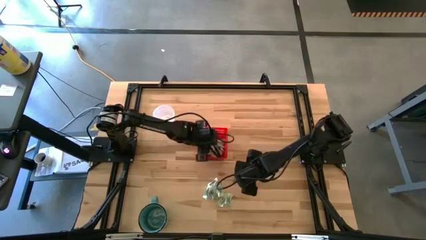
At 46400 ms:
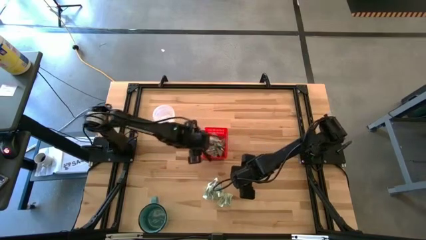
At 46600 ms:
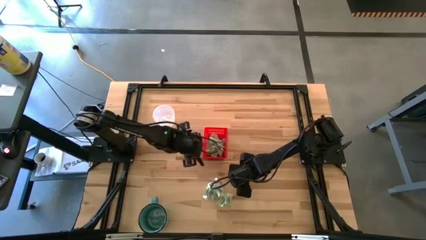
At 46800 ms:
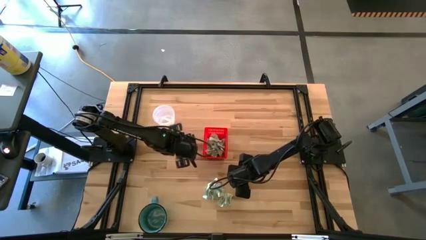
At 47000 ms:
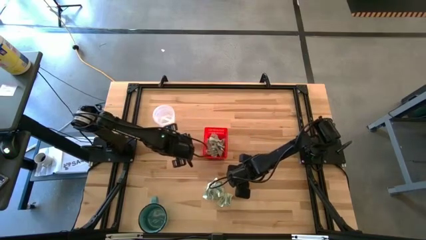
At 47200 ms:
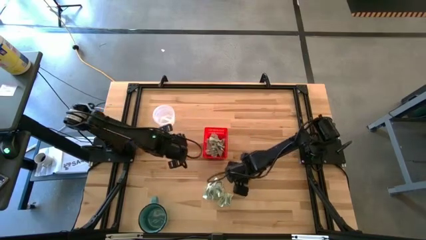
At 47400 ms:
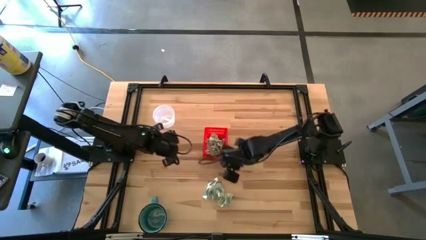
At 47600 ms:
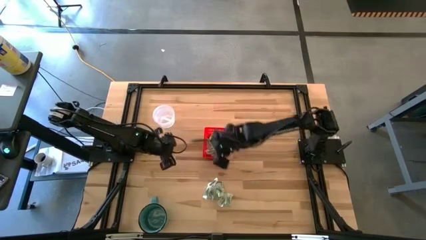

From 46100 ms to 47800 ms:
Task: Pick and place Stevia / Truvia into bins
Put the truvia packet into the red basket

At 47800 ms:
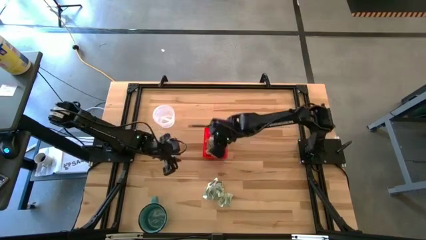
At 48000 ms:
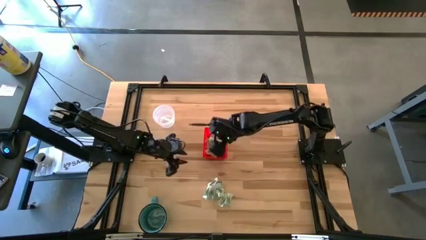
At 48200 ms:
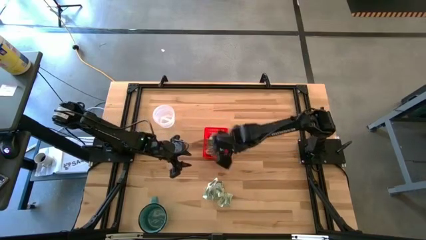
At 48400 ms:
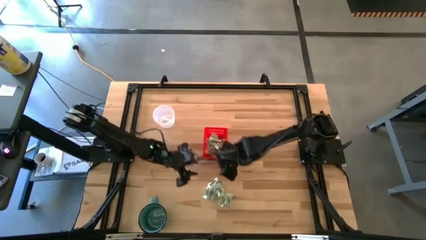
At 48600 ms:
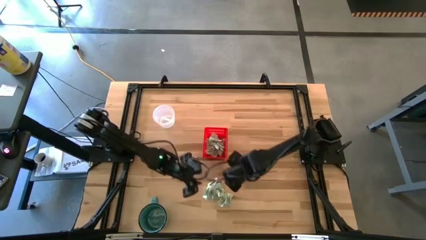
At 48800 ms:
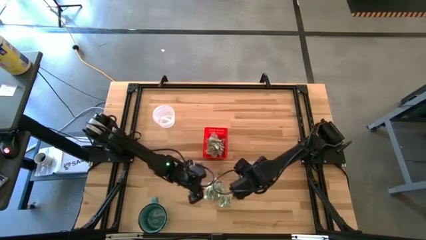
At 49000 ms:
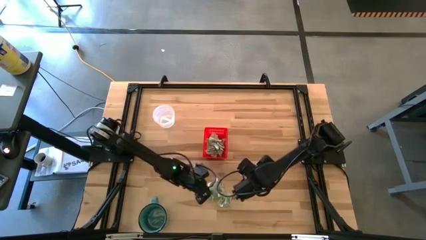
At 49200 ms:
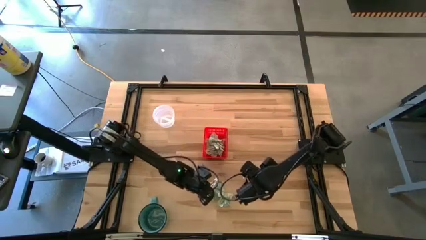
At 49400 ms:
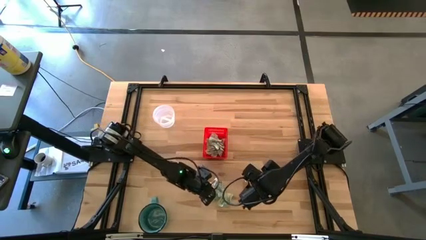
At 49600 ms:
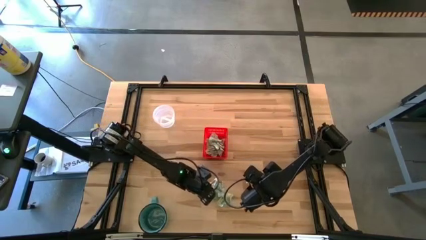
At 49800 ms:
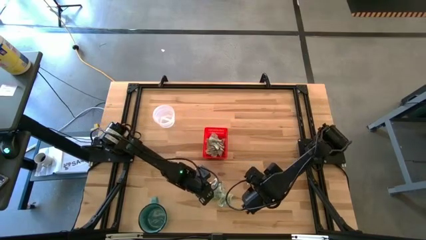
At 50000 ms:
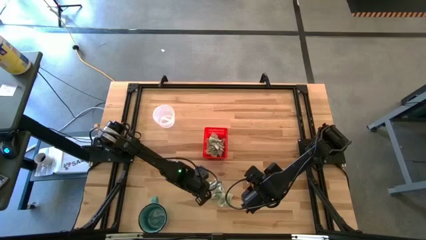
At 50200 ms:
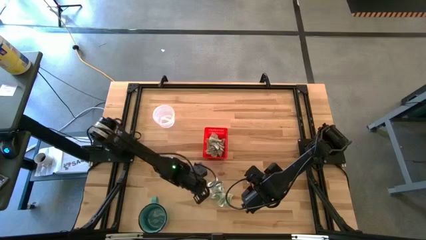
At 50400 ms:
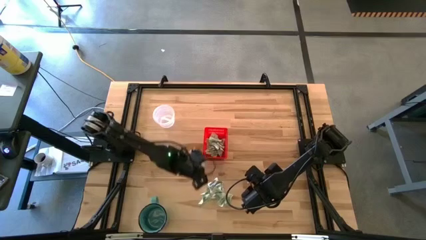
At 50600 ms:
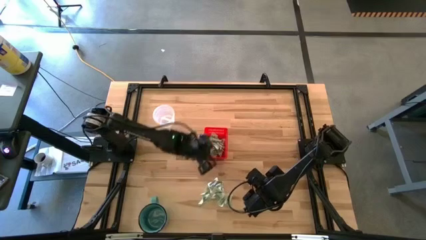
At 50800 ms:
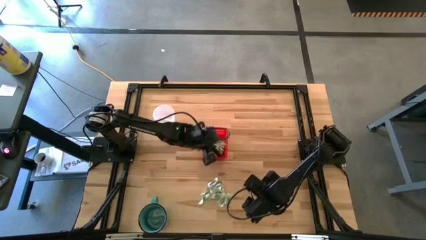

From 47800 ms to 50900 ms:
Put the stevia packet into the red basket

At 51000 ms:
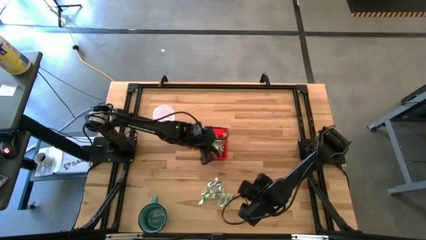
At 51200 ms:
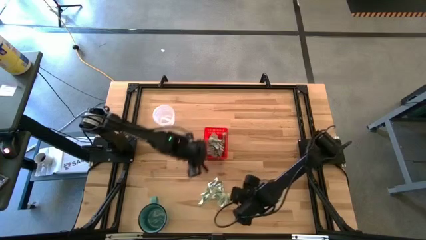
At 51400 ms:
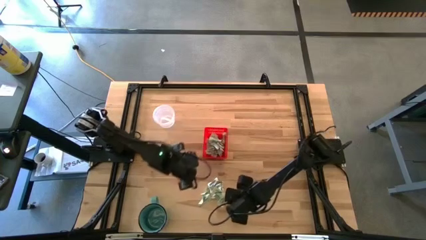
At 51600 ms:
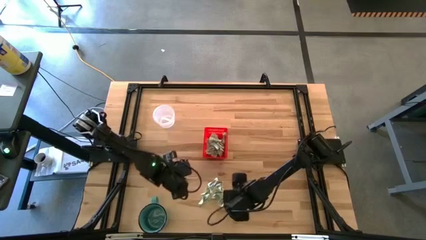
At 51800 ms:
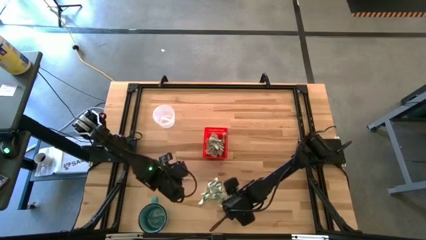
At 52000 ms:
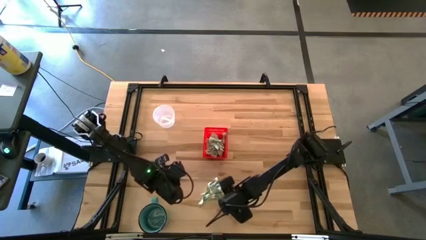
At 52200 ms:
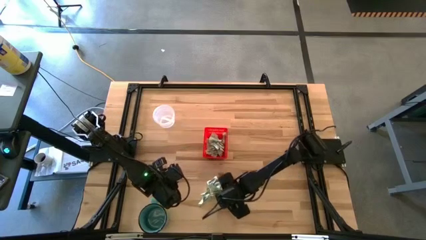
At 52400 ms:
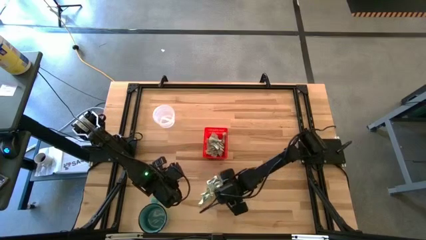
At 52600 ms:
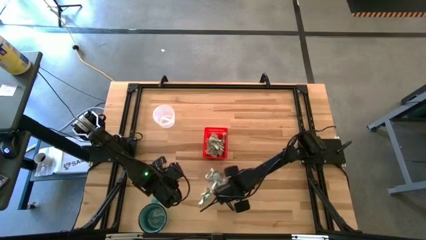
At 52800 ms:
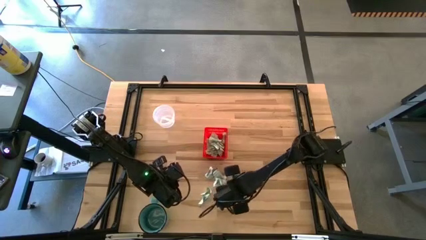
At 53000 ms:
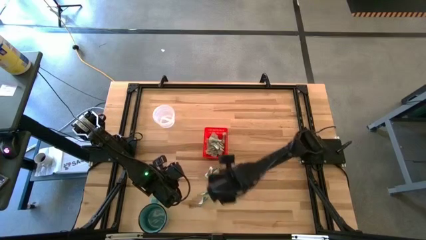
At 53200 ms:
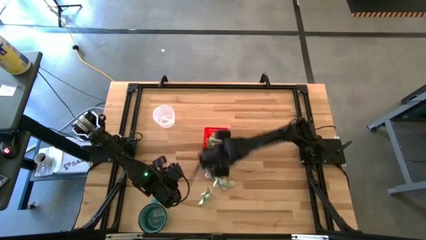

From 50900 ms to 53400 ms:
Put the stevia packet into the red basket

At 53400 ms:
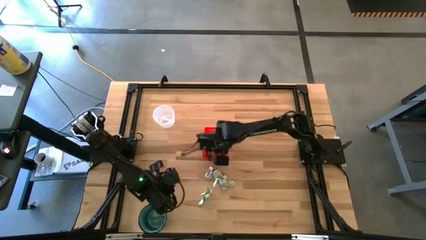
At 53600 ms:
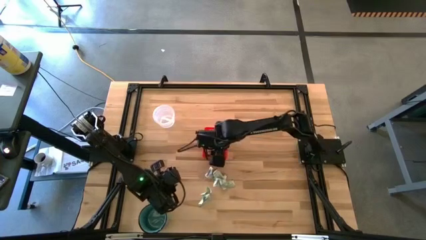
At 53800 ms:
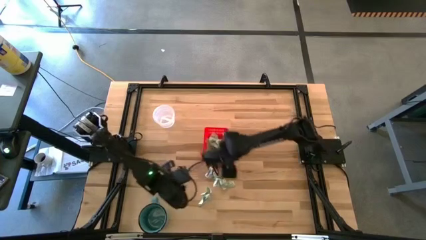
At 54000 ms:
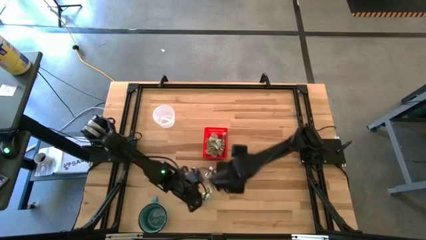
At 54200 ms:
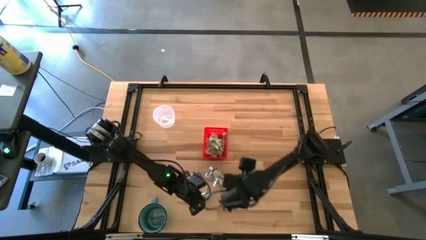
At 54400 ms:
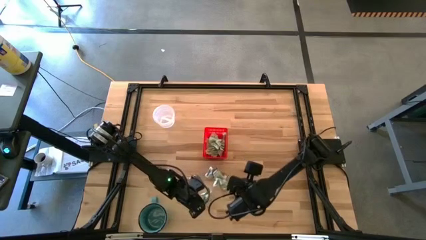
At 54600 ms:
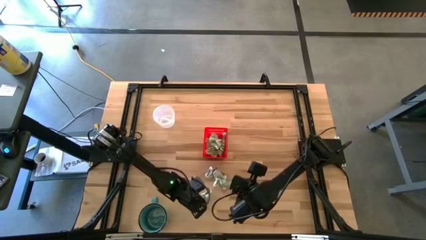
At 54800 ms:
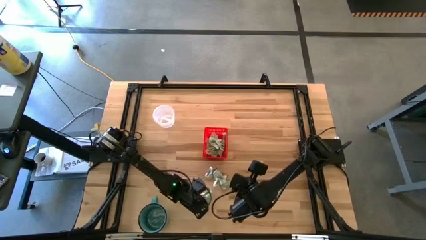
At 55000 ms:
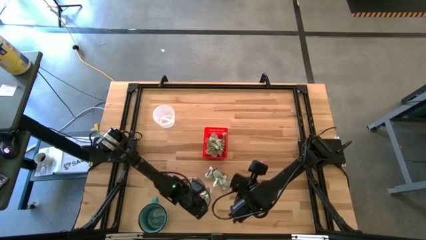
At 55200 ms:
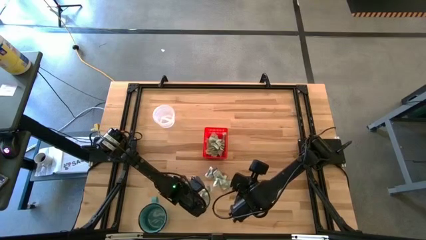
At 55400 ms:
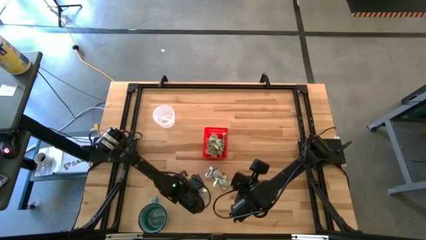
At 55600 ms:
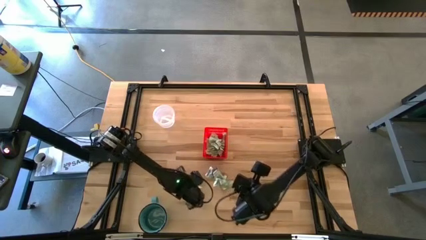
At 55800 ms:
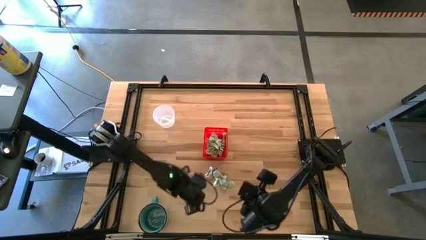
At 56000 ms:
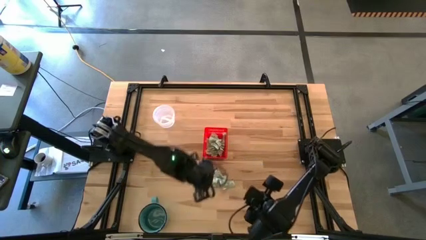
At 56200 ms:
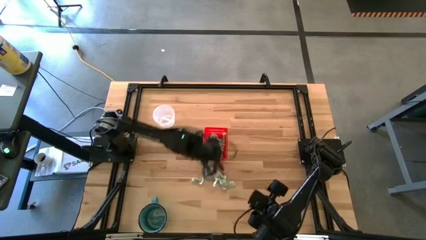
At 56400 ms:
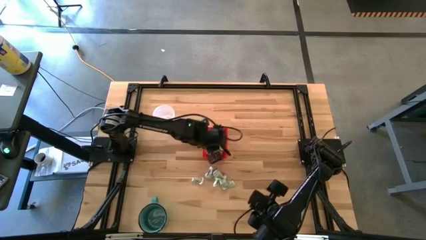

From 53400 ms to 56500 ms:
Put the stevia packet into the red basket

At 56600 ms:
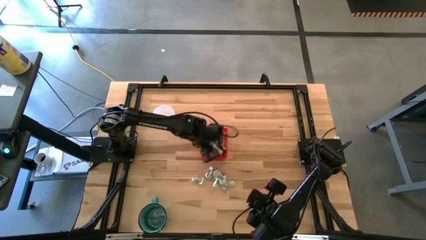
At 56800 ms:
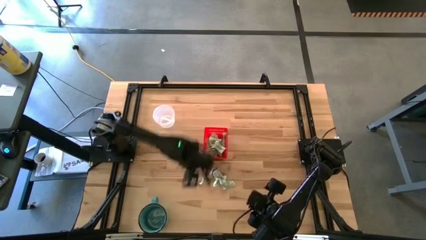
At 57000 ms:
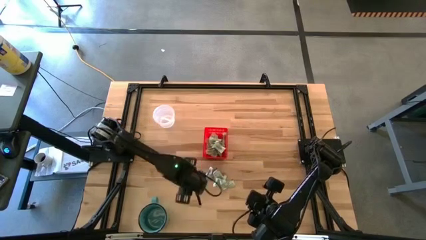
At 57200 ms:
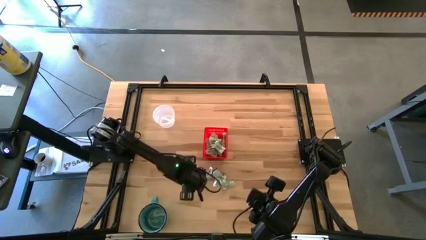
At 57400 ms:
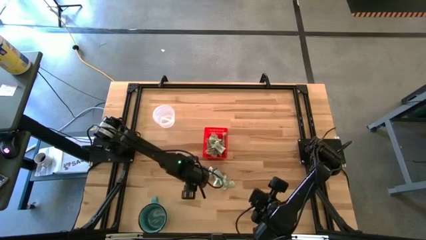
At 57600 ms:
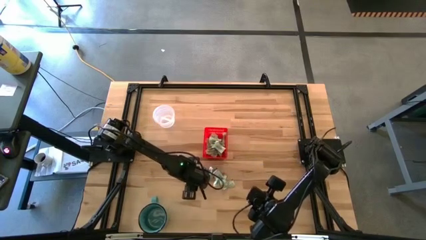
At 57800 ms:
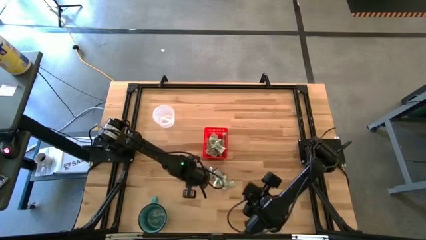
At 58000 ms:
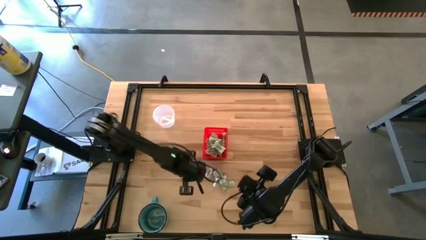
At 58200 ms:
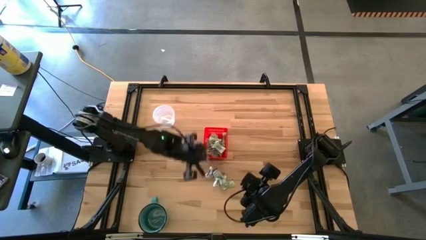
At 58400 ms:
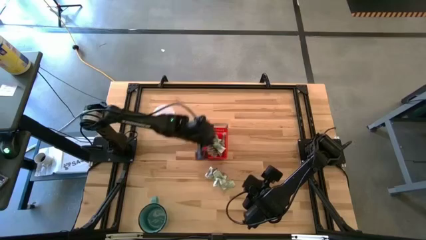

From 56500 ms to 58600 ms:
Put the stevia packet into the red basket

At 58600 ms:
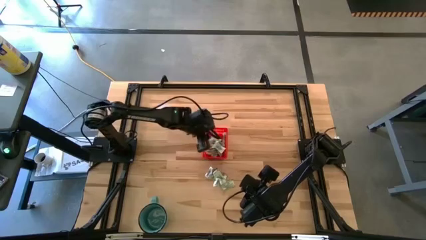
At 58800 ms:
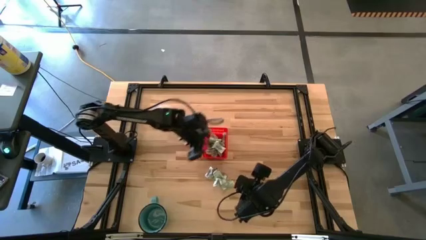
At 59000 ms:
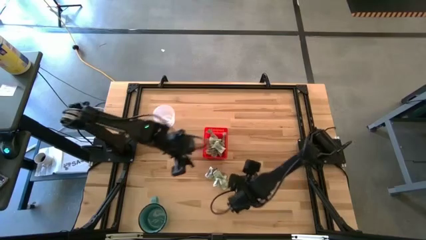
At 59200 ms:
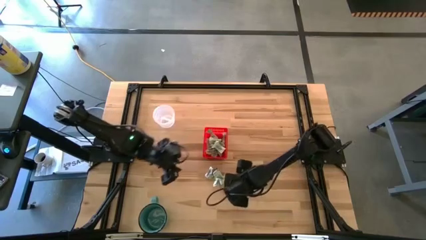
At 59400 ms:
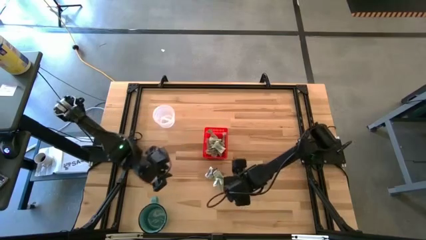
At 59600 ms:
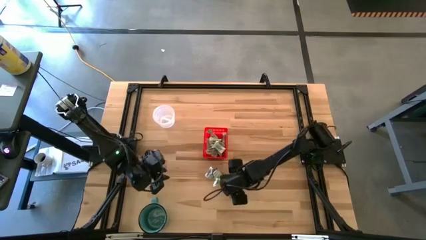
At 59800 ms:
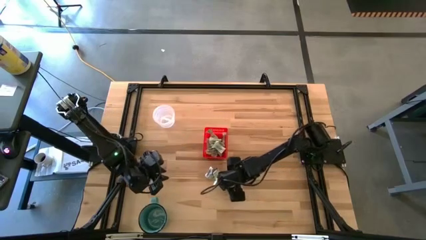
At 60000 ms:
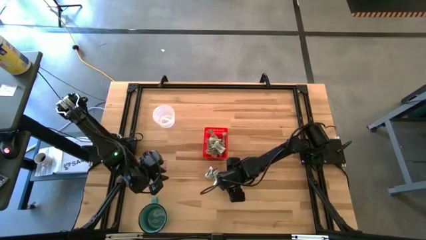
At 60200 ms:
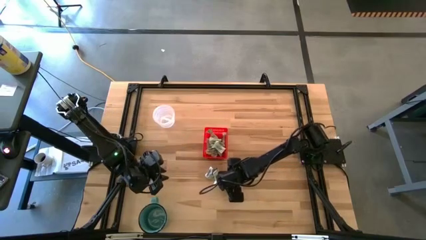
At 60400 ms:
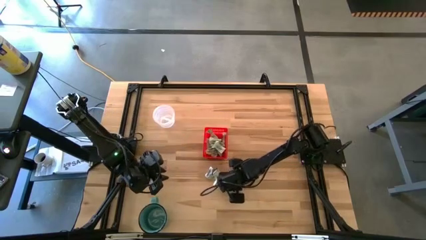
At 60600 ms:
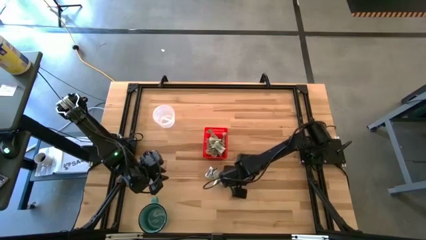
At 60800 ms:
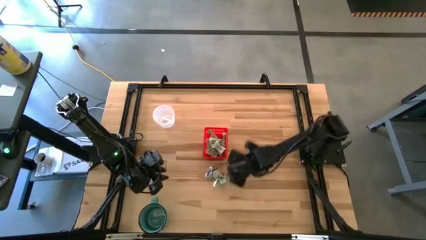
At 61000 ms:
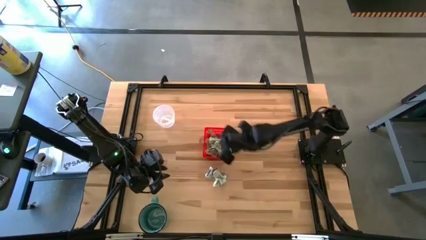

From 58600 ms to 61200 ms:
Put the stevia packet into the red basket

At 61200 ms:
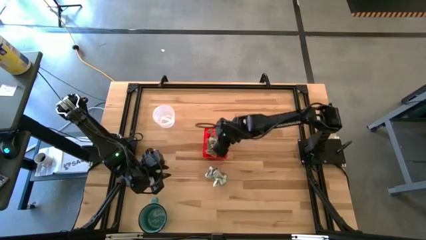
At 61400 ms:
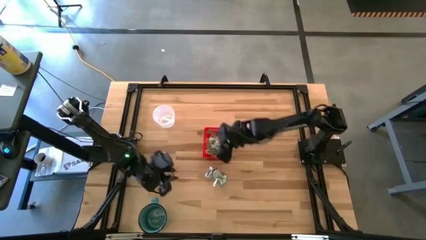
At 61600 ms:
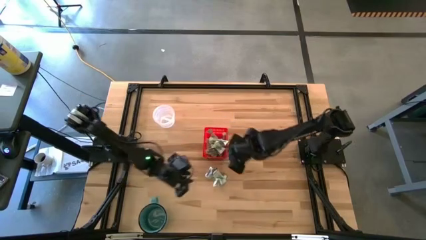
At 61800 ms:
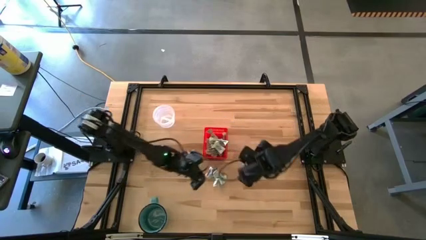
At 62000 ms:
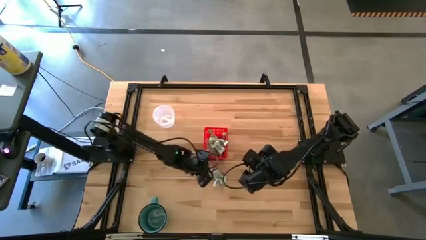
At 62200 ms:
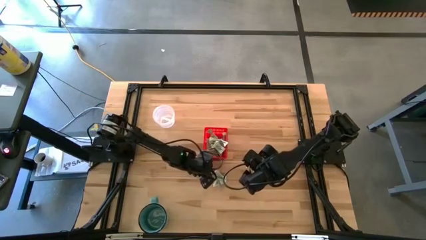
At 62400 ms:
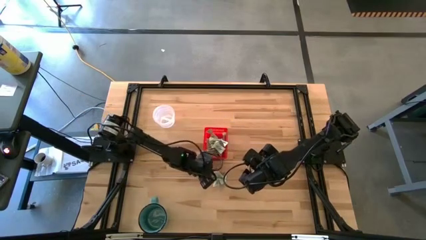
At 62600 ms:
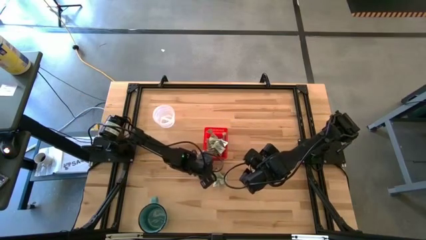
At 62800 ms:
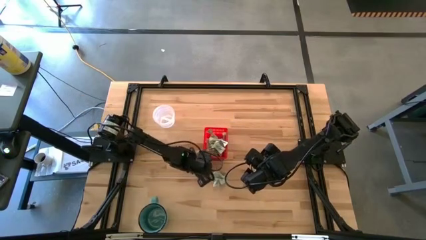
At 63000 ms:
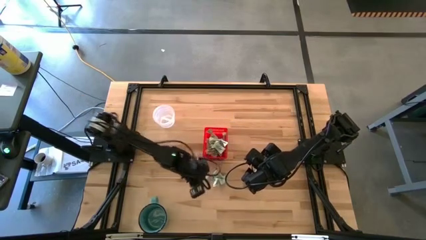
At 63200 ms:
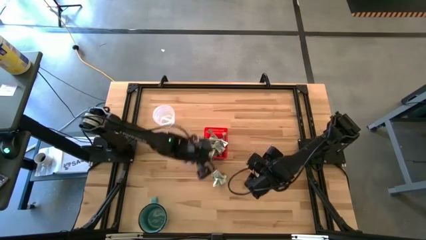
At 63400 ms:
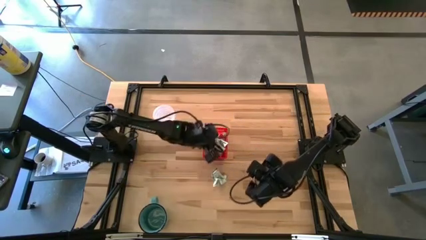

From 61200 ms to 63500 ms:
Put the stevia packet into the red basket

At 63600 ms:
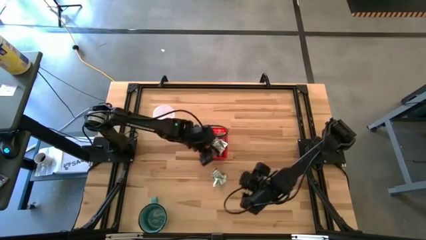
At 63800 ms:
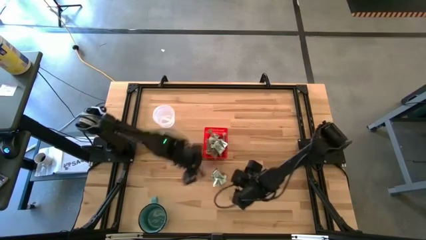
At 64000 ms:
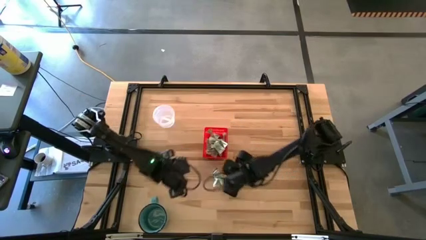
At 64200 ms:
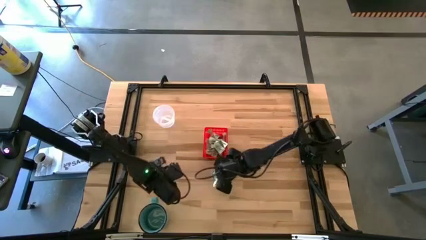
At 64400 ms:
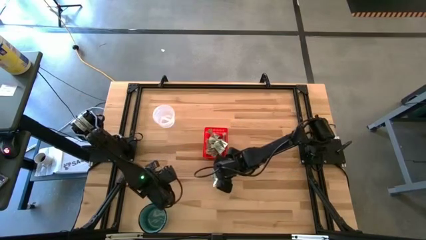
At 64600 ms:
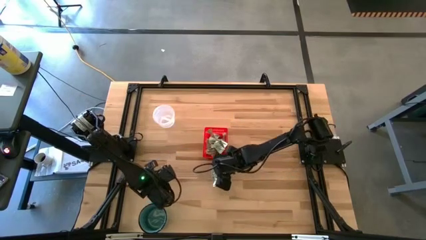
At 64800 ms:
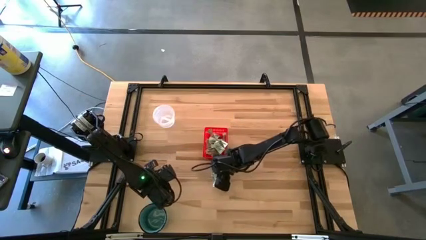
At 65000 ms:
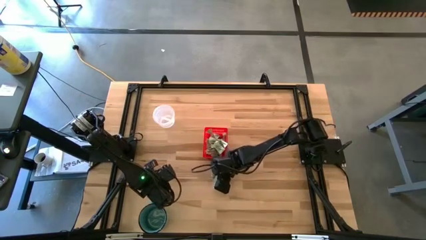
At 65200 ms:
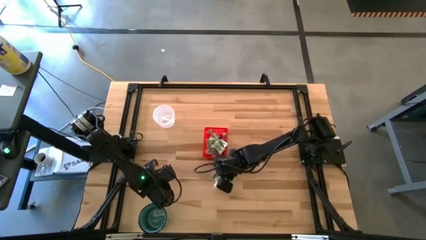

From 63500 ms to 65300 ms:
Put the stevia packet into the red basket
